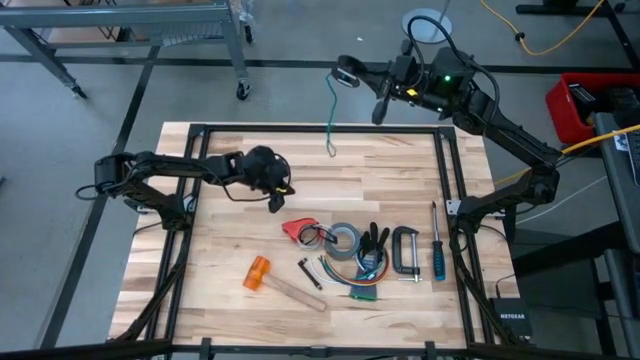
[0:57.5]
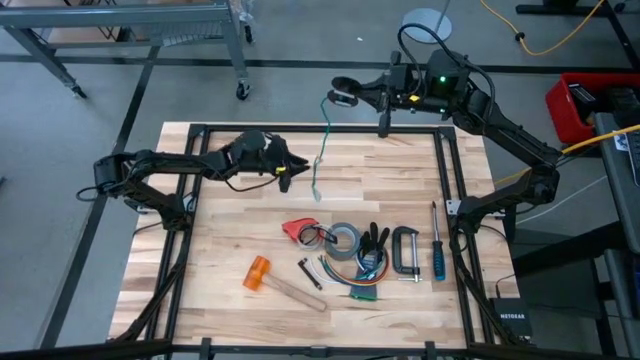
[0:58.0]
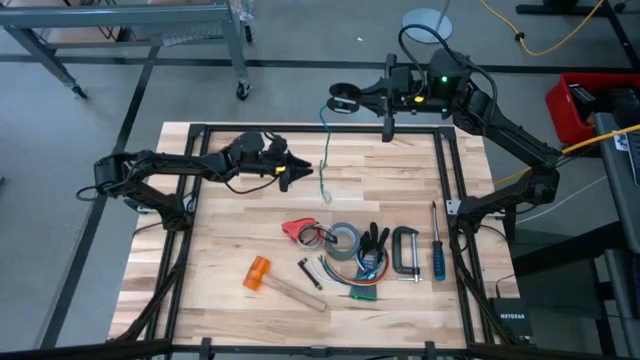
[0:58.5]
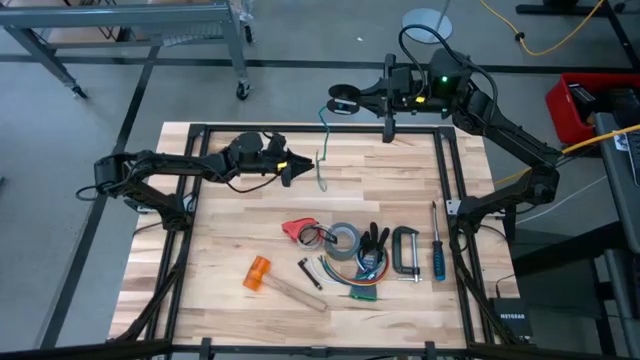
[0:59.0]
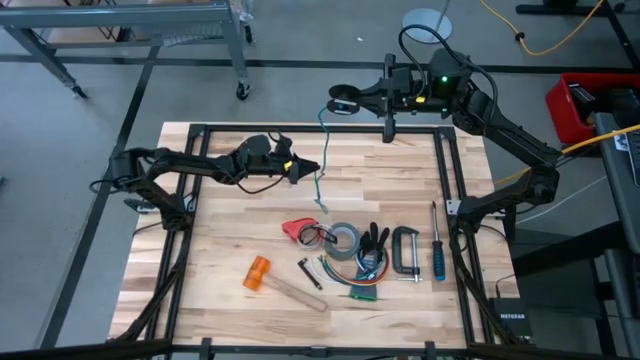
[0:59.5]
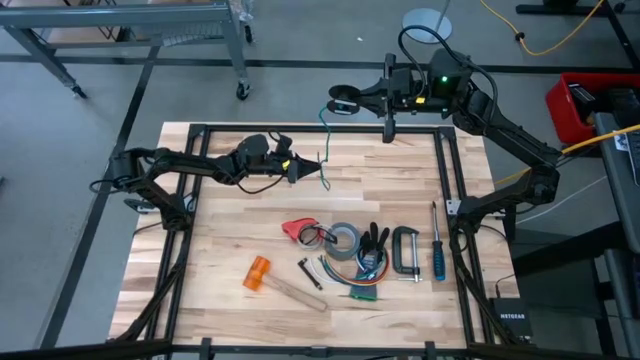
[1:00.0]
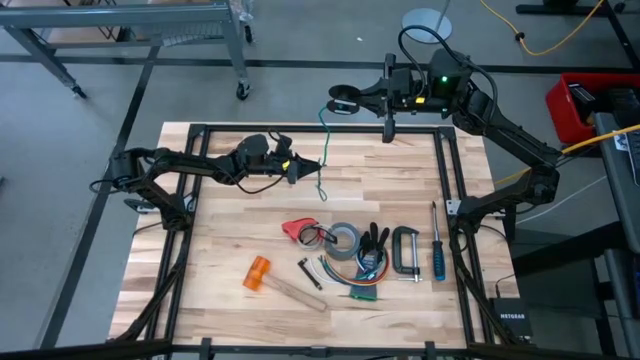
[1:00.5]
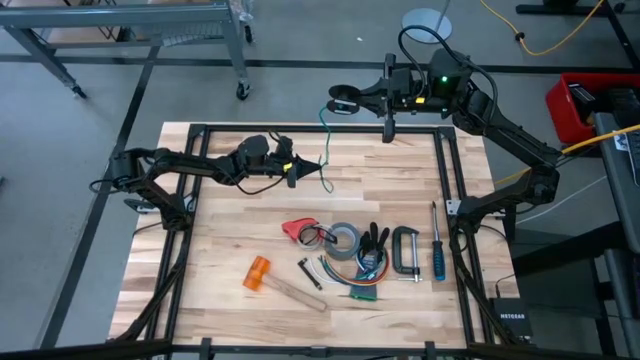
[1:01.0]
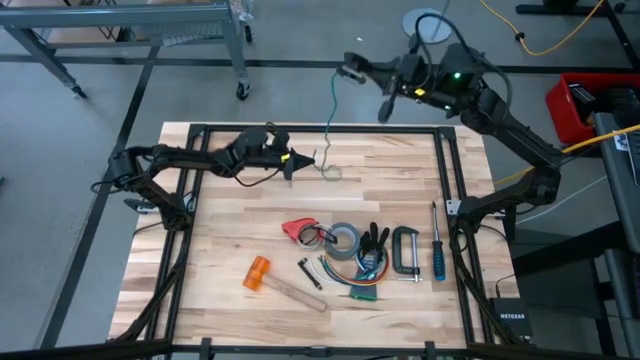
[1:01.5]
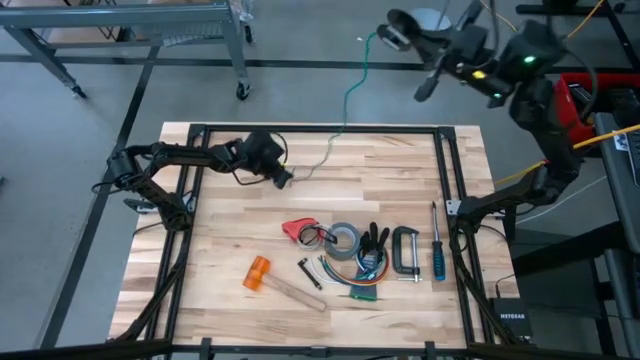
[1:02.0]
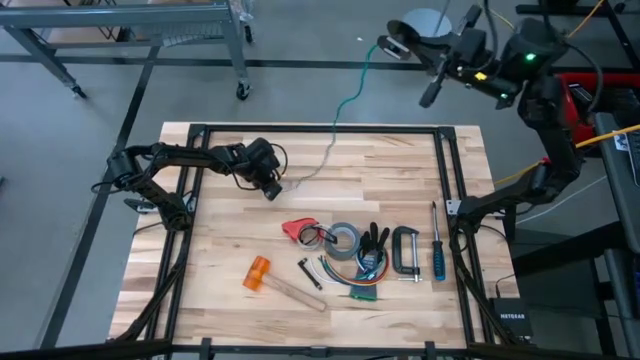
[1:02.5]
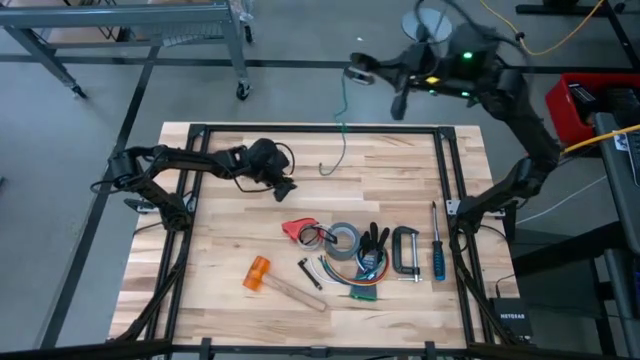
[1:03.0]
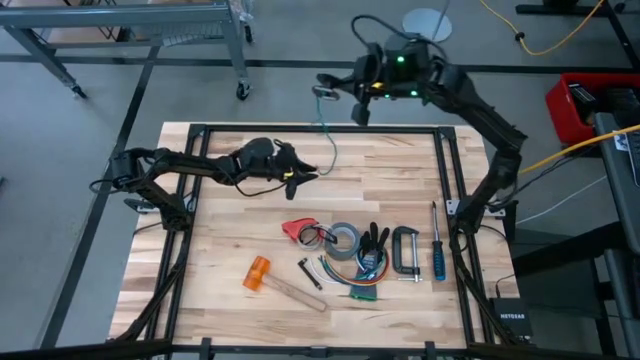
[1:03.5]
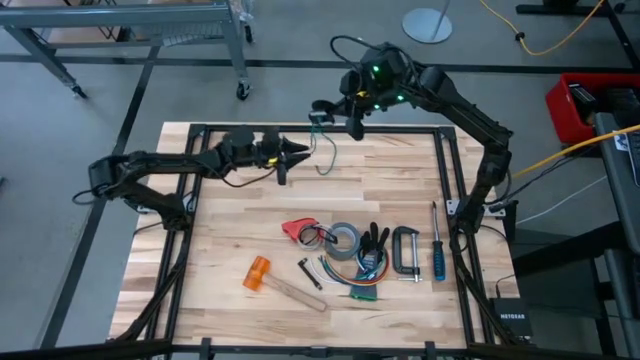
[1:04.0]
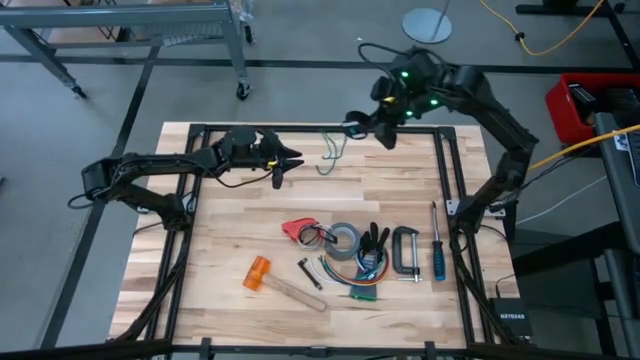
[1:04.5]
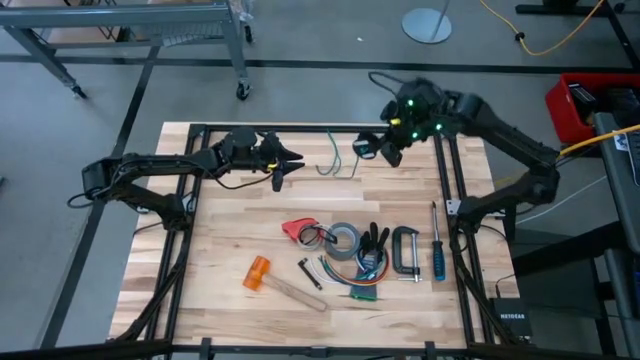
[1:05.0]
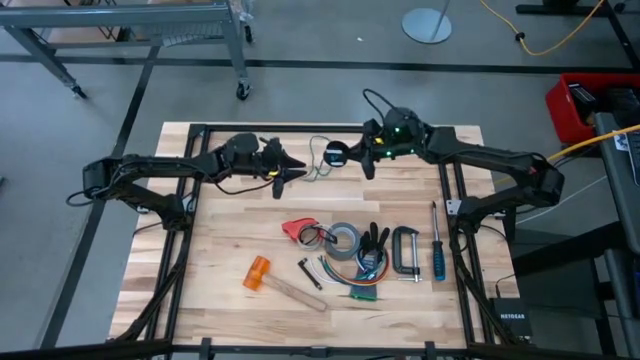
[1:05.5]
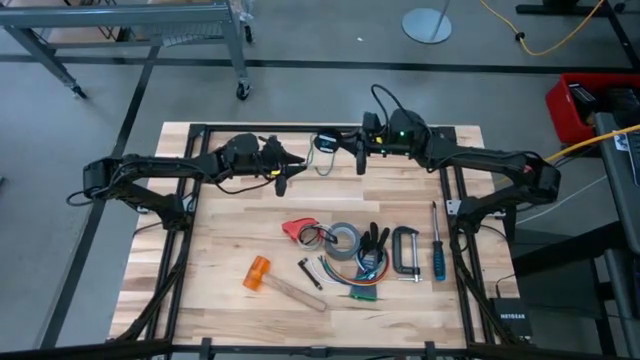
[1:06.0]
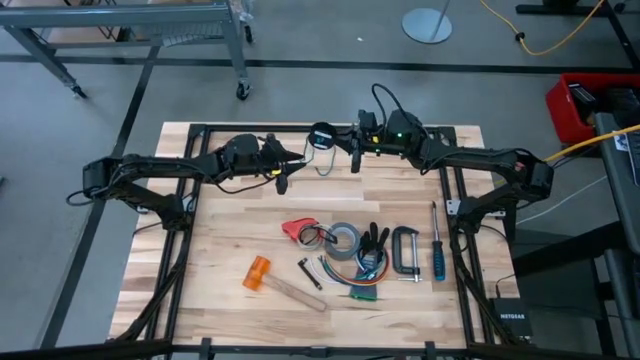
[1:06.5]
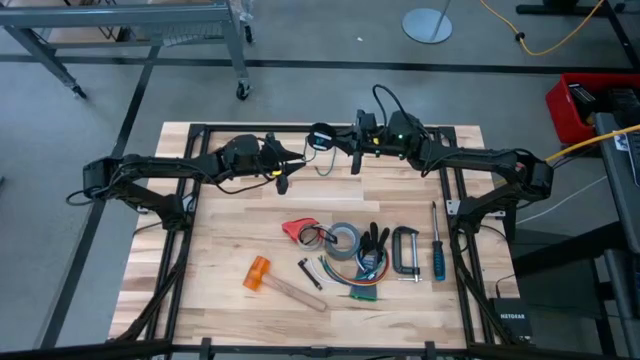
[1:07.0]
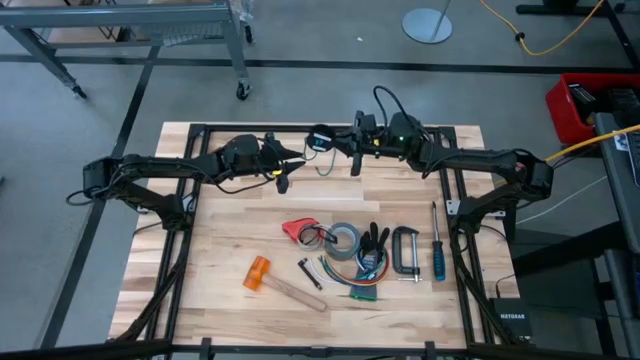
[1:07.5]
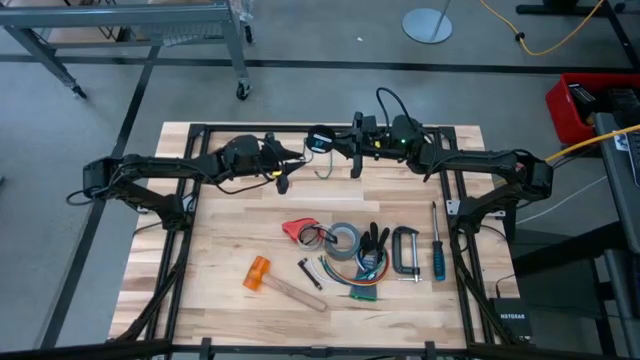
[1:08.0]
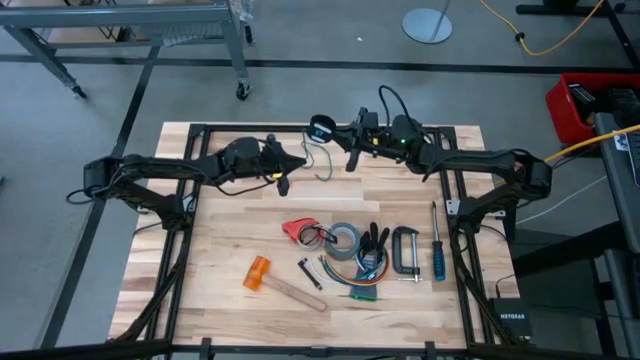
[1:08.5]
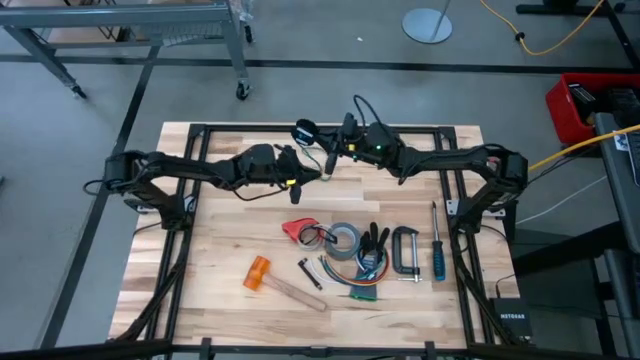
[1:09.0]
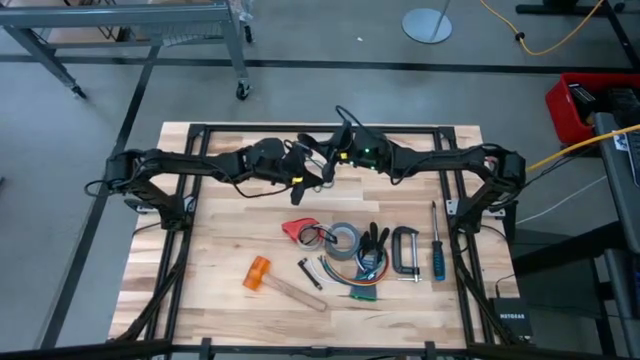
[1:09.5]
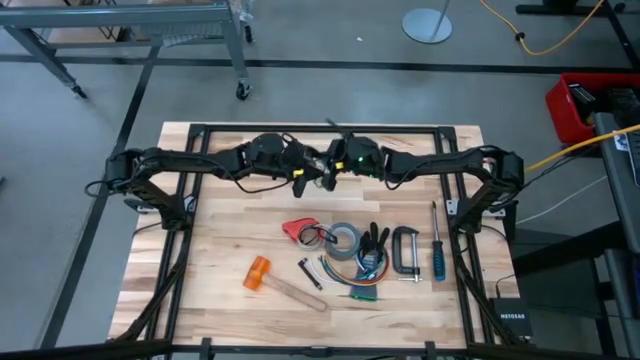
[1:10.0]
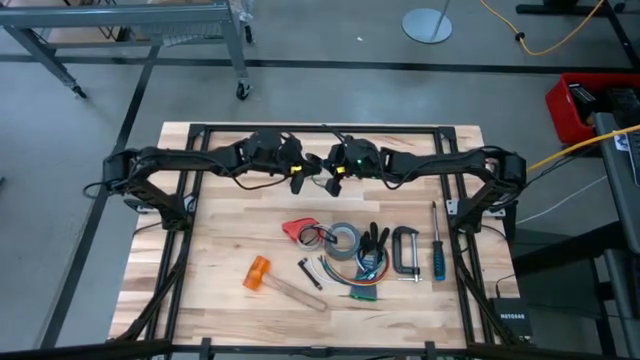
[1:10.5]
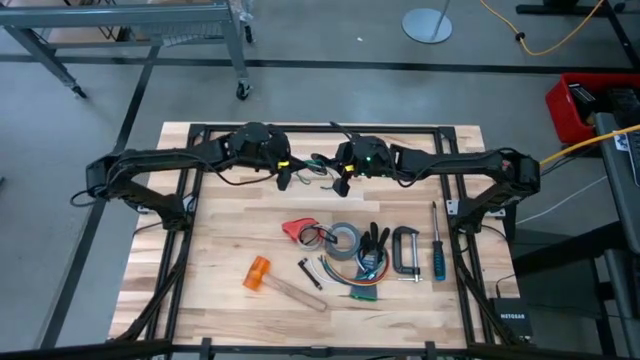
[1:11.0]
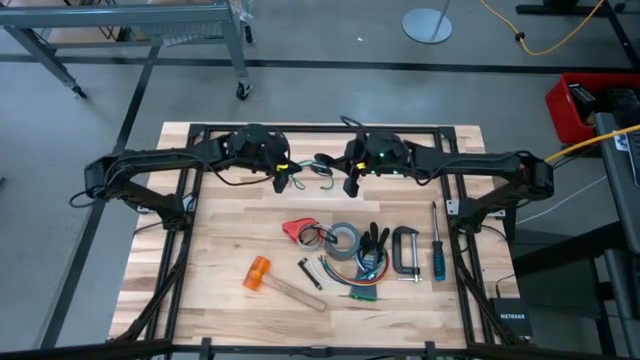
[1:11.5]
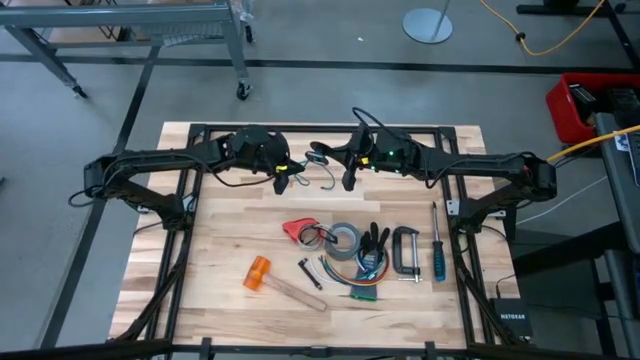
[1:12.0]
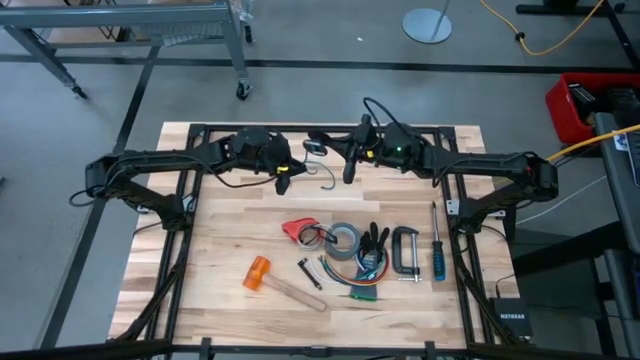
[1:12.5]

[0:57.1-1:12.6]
Task: Coil cords
Coil the green cable wire on the black spool

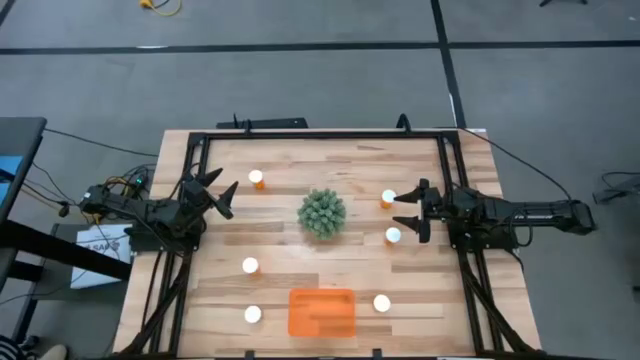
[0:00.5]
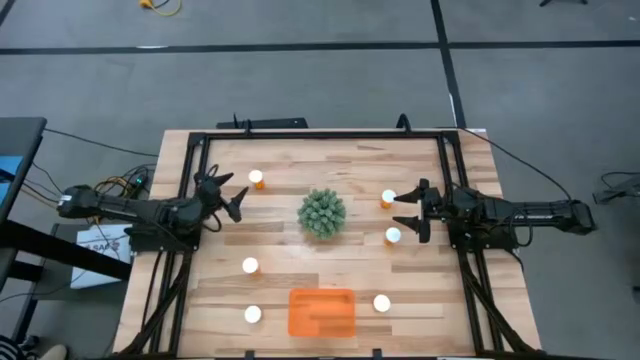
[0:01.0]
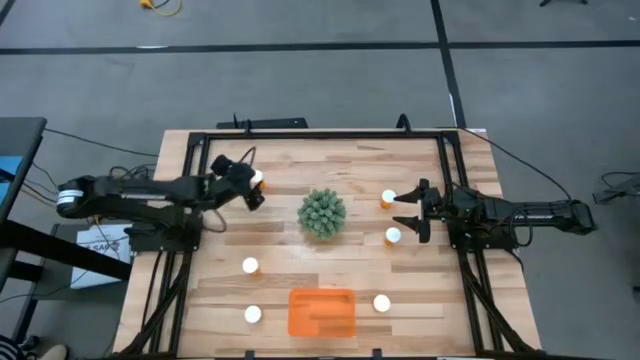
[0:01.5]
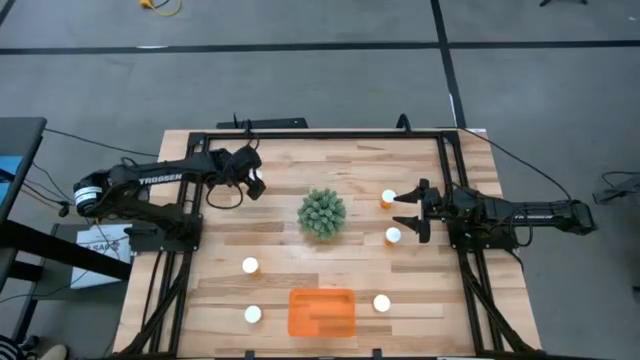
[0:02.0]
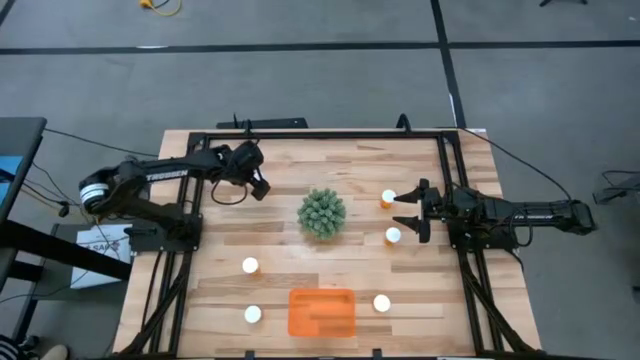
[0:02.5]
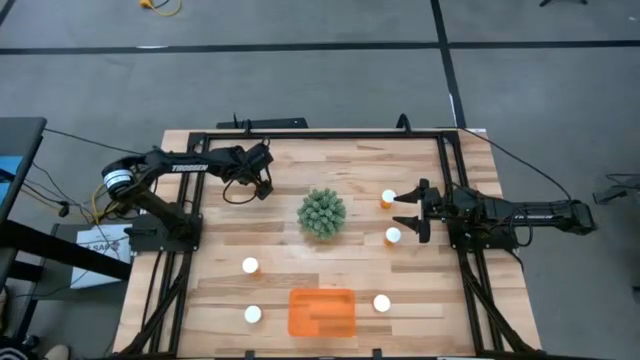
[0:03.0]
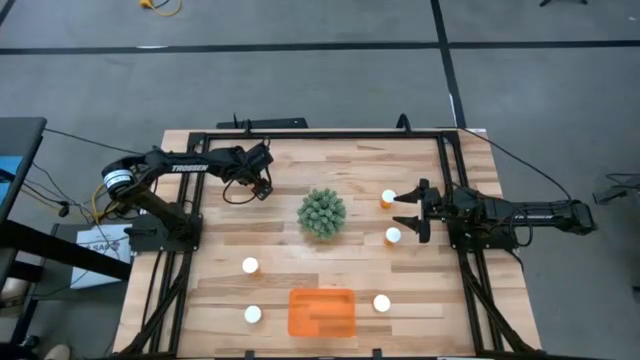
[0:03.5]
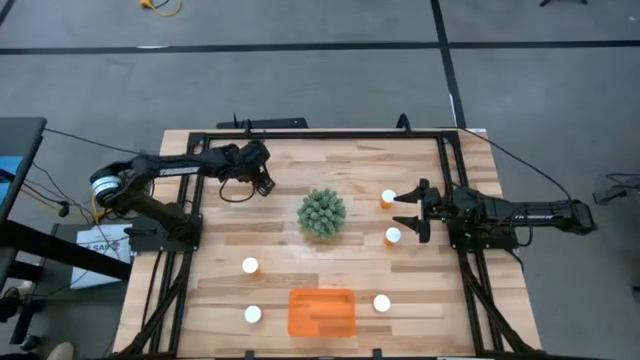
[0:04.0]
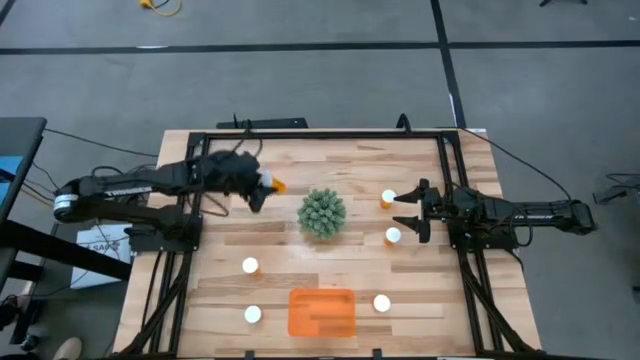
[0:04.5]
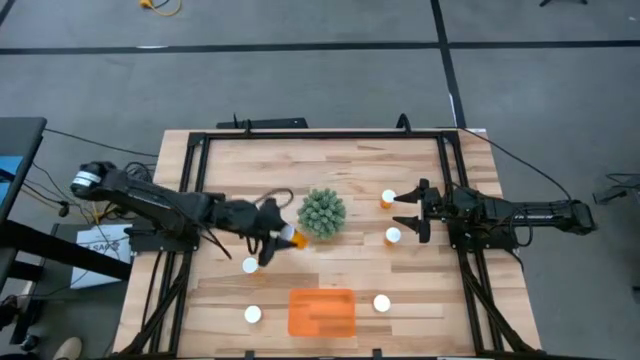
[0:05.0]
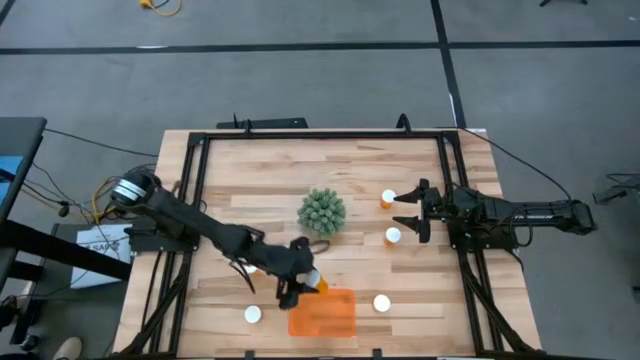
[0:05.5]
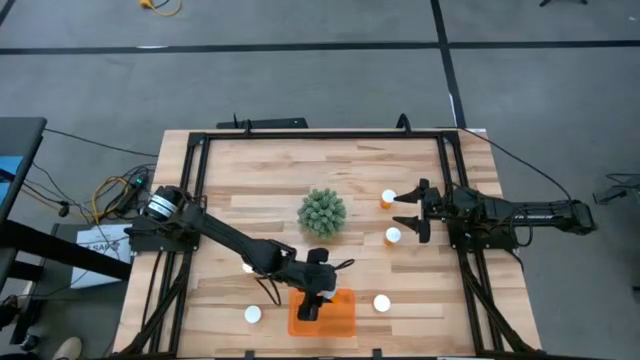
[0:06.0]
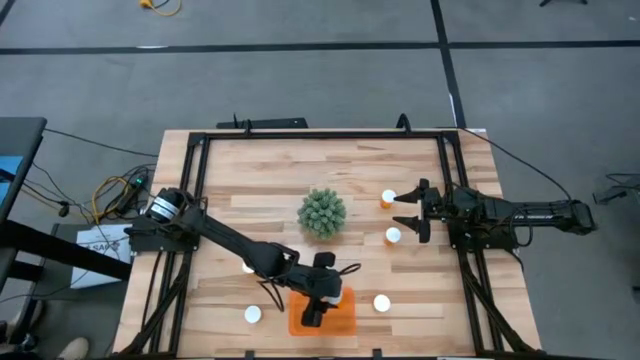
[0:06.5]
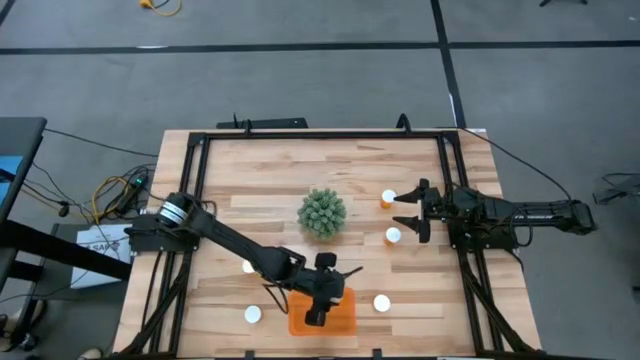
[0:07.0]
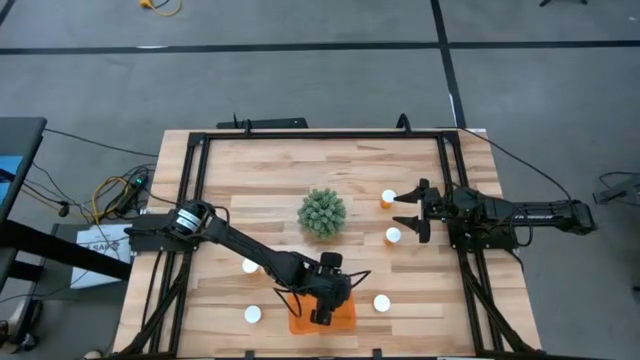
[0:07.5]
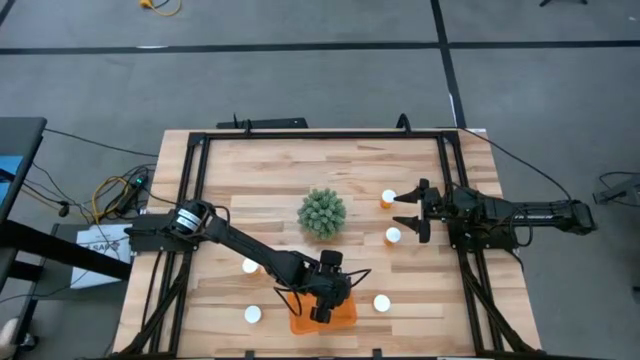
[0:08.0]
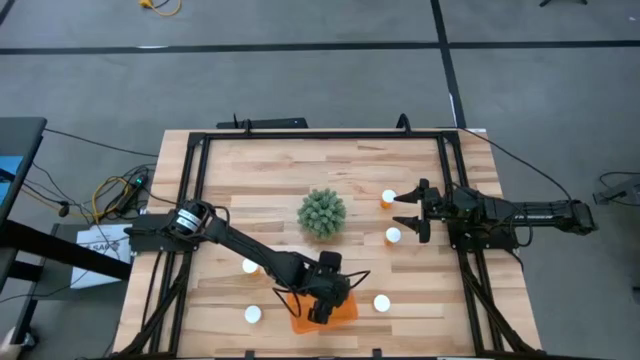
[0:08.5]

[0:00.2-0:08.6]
Task: Pick and place pill bottles into a basket
Put the orange pill bottle into the orange bin
